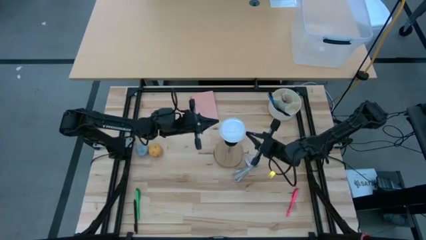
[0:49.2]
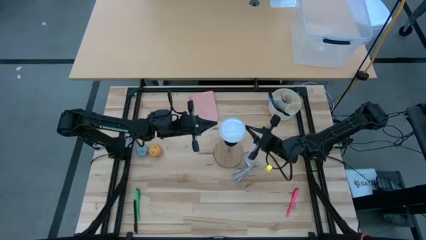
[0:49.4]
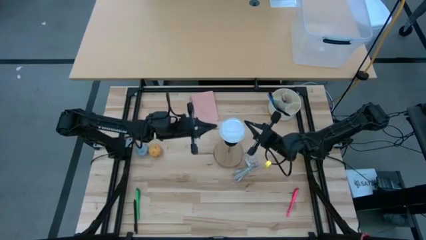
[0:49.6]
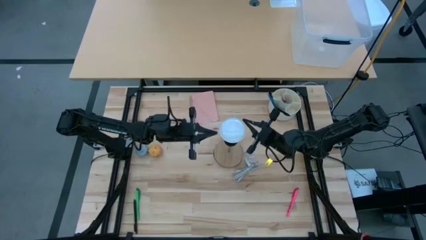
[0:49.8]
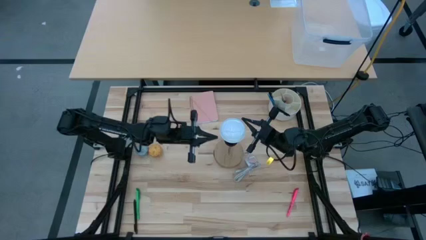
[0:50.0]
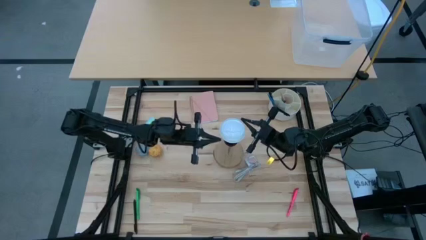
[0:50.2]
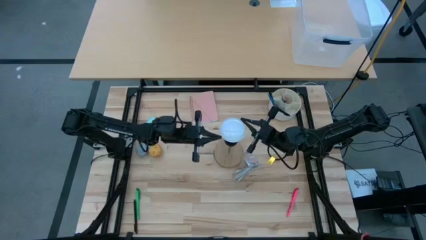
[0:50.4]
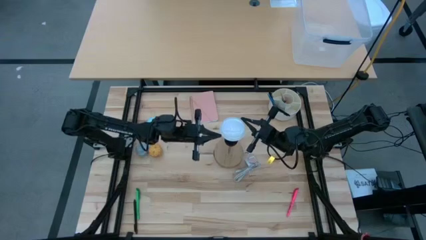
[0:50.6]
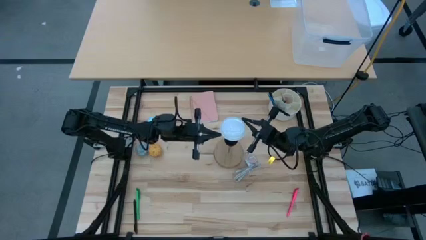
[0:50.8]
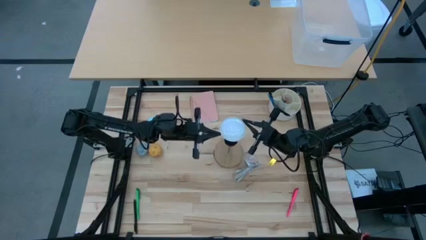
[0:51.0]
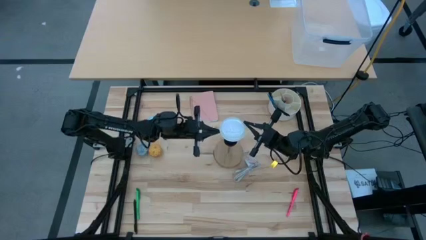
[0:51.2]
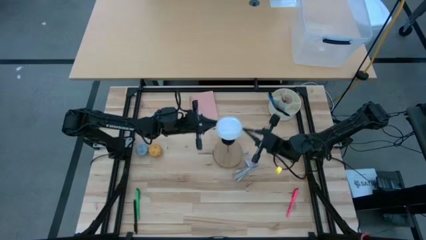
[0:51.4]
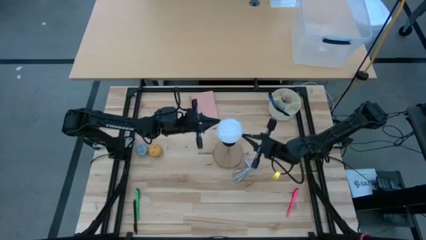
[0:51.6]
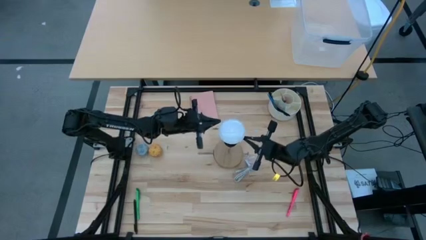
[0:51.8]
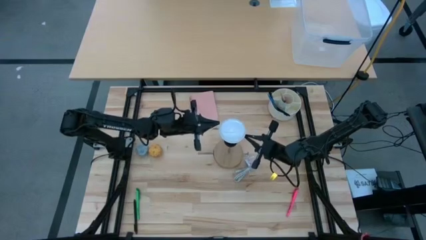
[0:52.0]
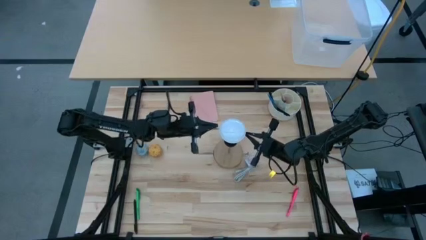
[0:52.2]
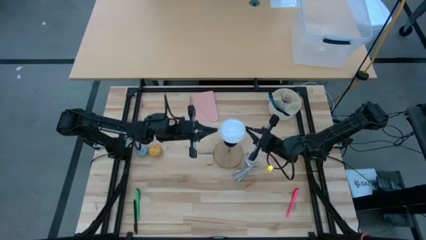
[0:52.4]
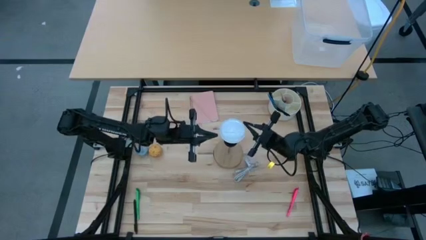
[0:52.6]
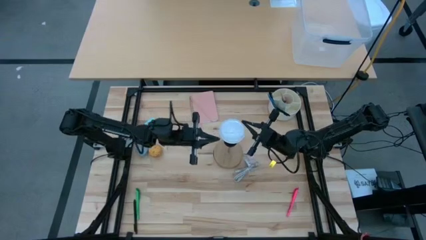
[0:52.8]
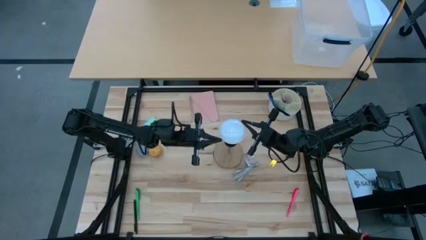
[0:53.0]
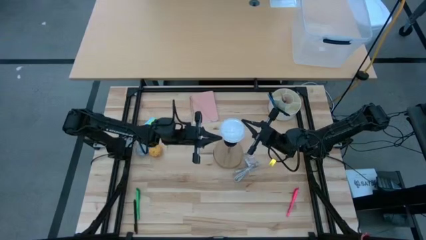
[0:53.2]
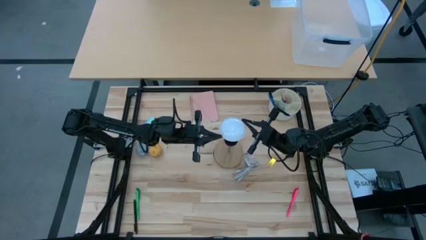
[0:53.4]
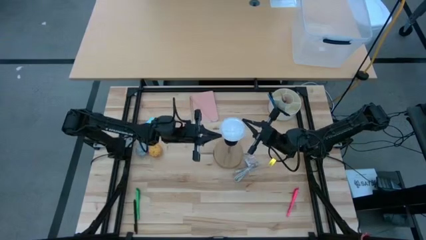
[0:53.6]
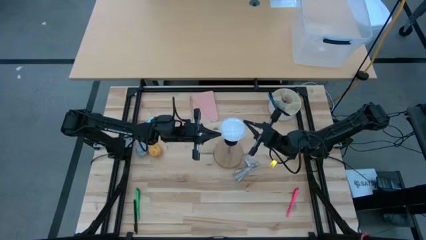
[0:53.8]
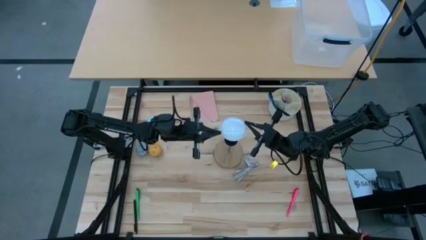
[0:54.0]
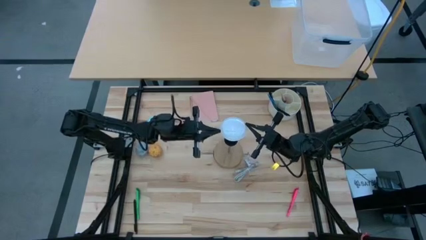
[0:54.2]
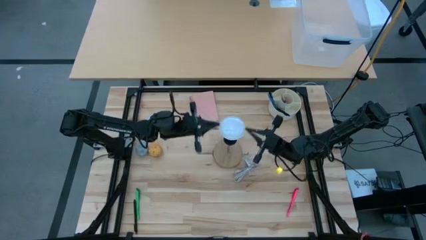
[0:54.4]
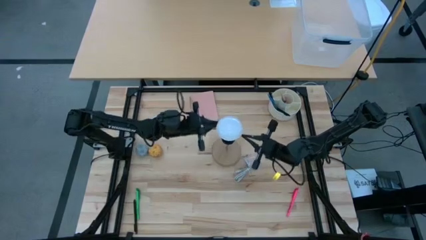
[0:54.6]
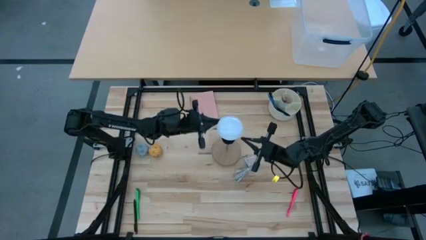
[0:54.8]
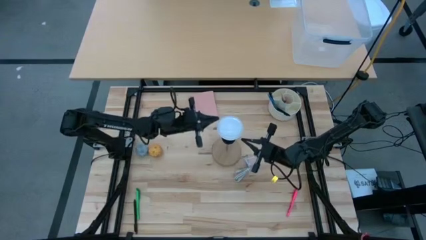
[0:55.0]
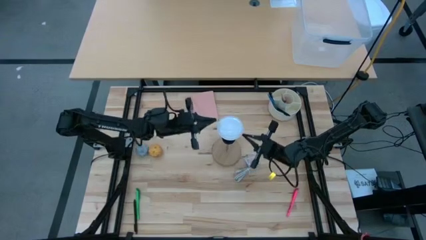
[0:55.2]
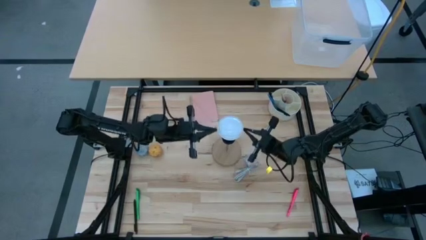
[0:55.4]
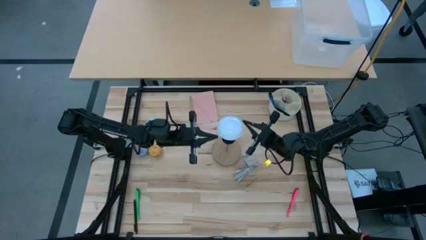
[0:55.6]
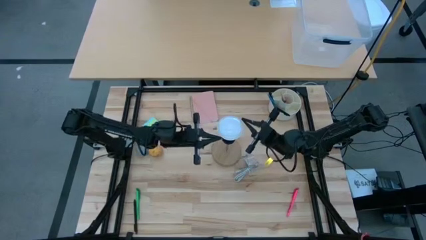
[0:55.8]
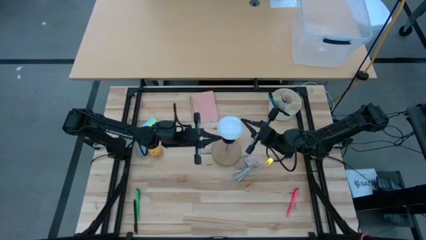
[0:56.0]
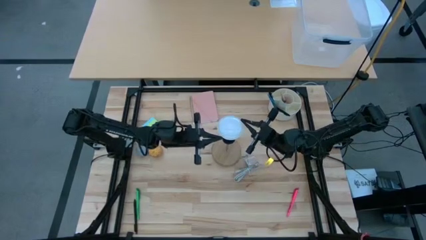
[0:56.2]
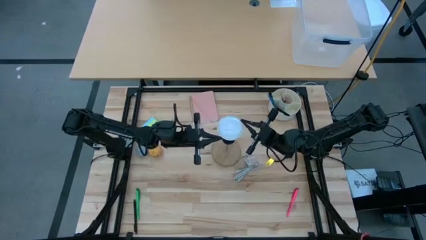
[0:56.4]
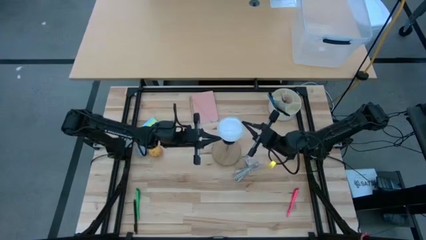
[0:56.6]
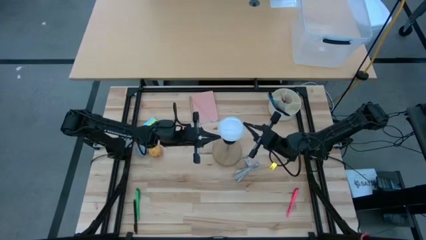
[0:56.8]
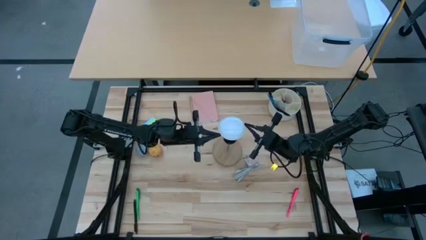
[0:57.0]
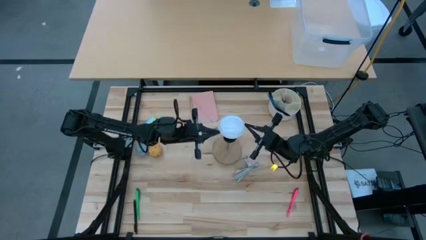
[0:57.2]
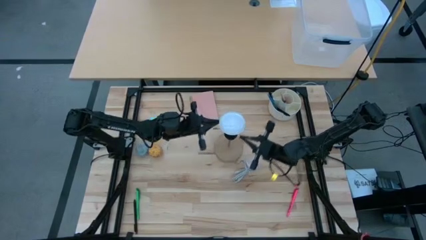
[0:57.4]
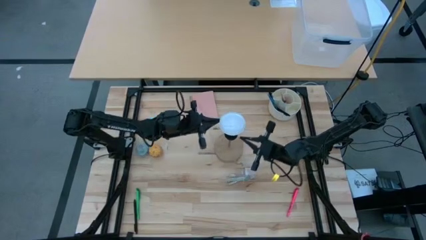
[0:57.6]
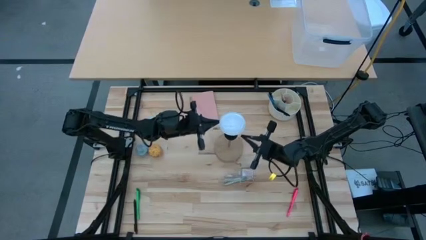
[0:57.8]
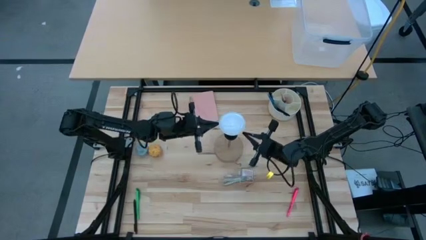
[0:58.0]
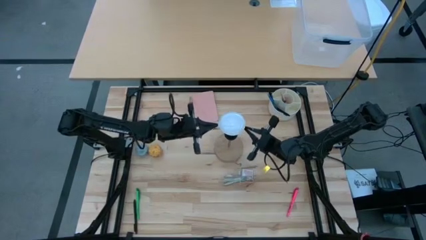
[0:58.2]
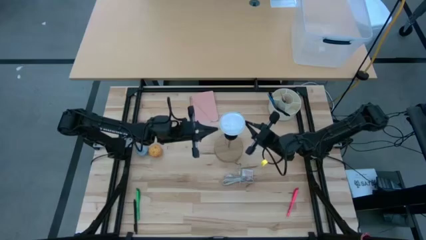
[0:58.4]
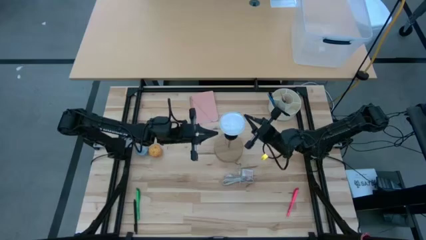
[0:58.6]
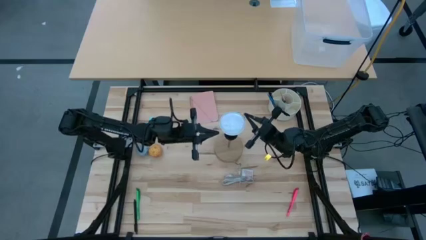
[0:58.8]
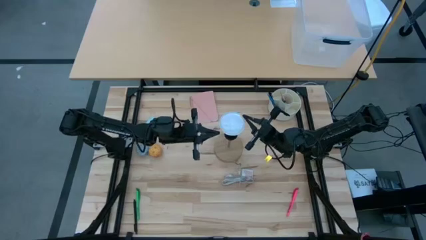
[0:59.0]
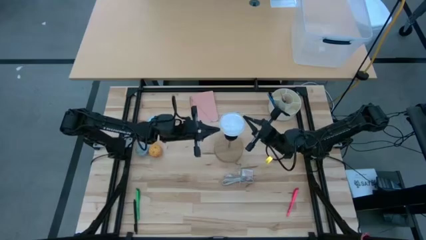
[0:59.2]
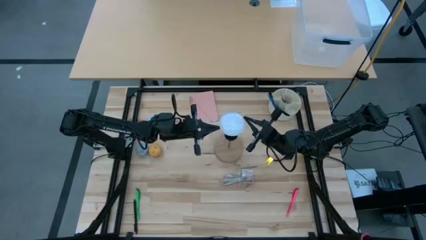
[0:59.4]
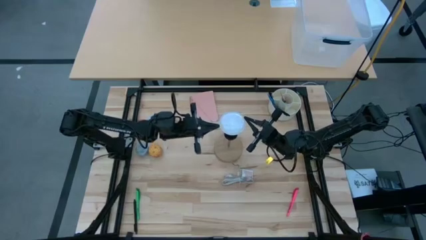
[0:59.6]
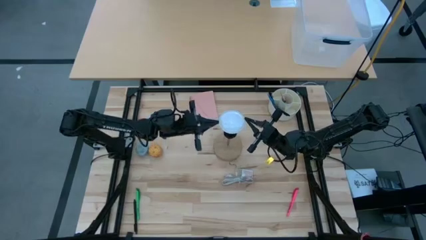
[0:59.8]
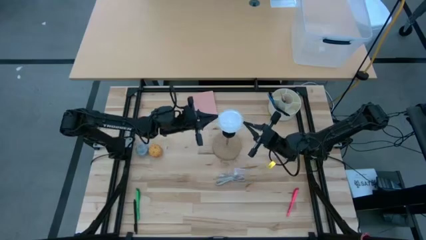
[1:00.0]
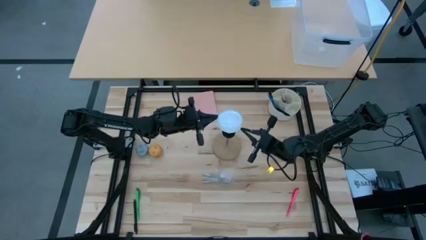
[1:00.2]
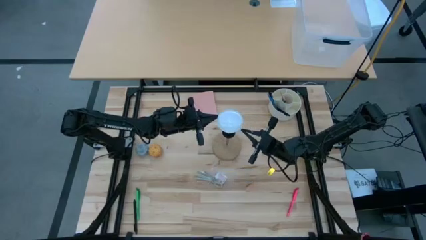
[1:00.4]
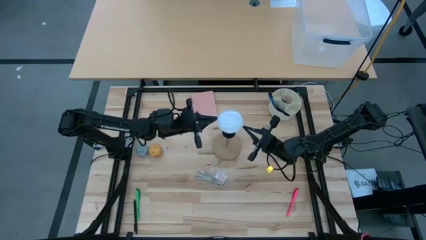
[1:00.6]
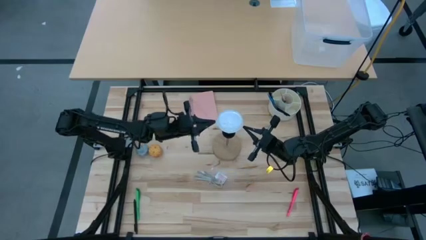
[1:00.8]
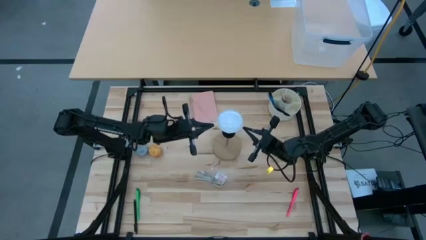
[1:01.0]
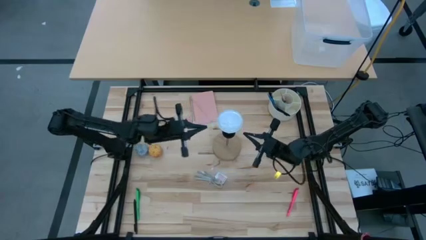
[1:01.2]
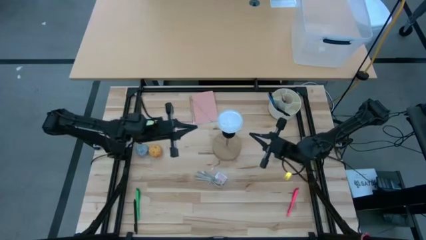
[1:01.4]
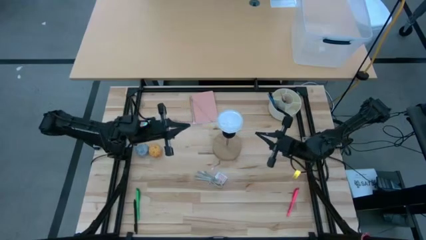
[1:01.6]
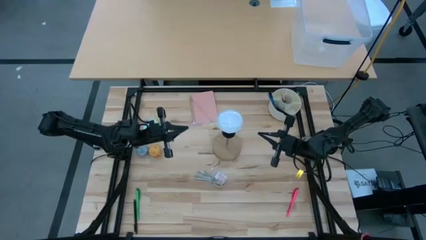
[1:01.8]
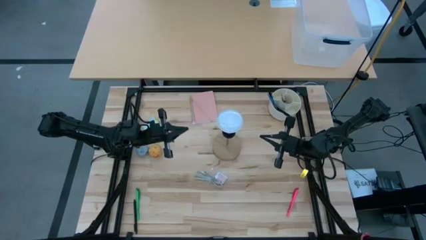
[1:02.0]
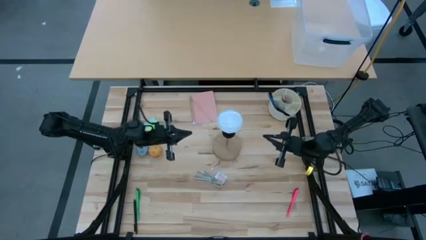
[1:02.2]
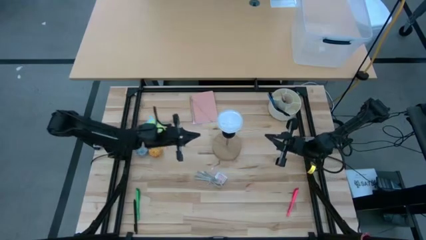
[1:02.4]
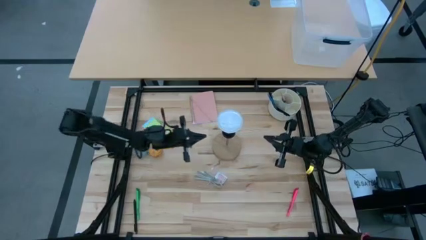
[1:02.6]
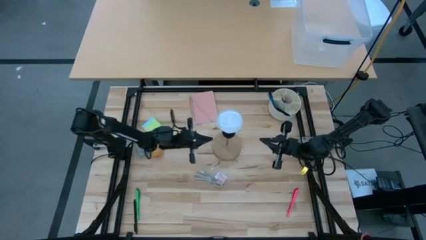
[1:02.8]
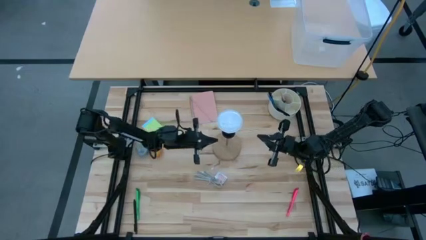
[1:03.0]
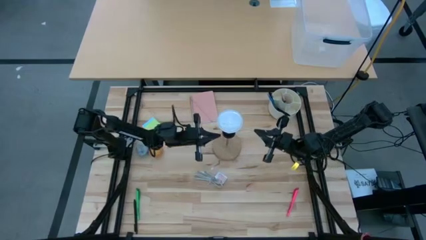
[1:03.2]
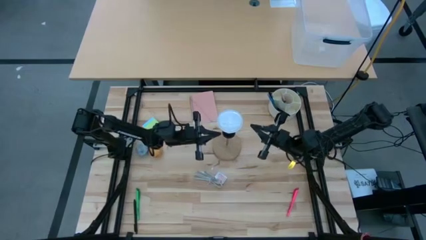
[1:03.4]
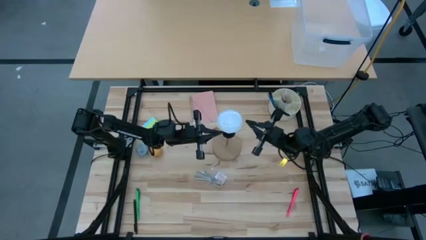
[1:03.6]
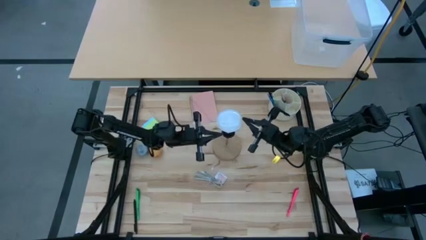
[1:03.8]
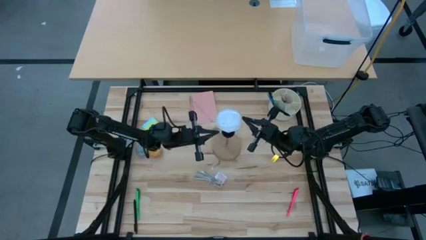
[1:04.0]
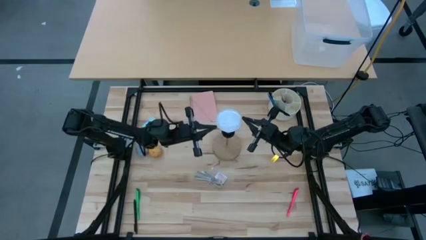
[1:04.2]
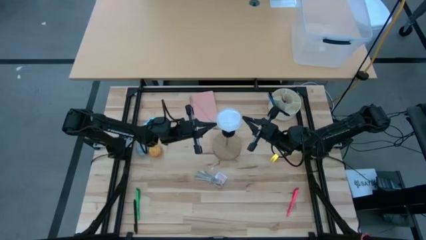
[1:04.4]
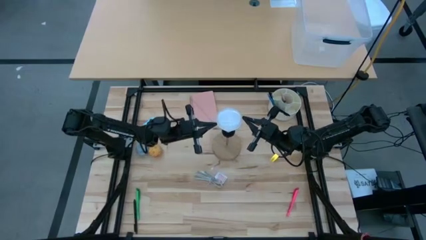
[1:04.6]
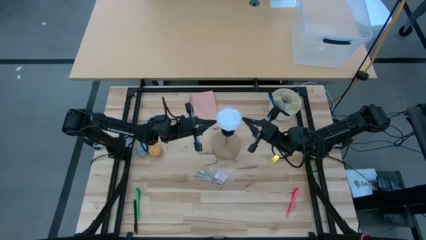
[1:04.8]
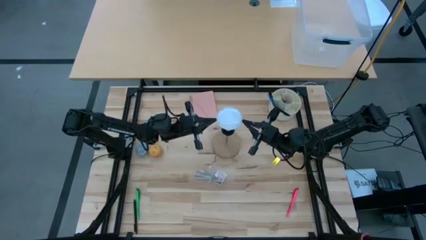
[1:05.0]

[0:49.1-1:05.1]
Task: Screw lightbulb
Insert the lightbulb into the lamp
